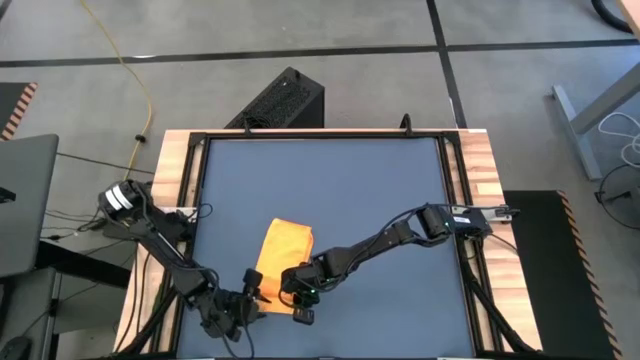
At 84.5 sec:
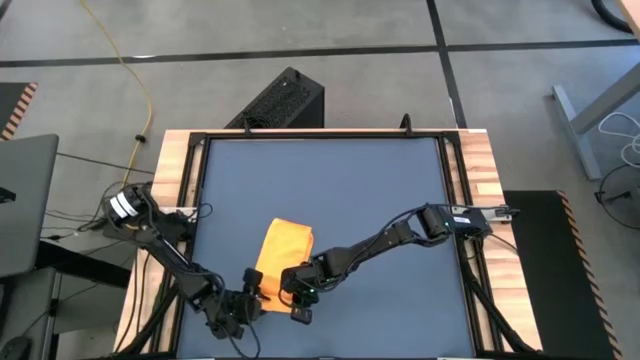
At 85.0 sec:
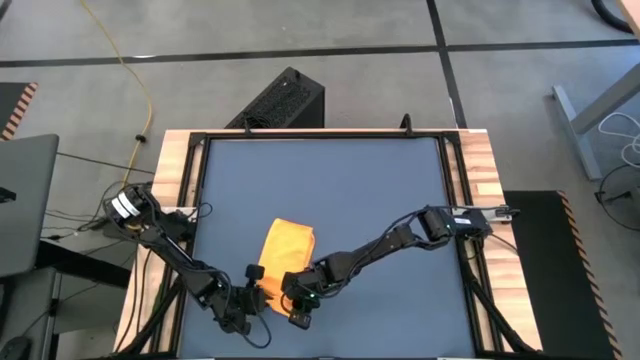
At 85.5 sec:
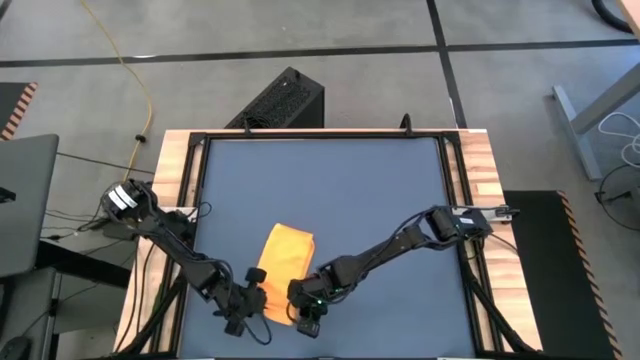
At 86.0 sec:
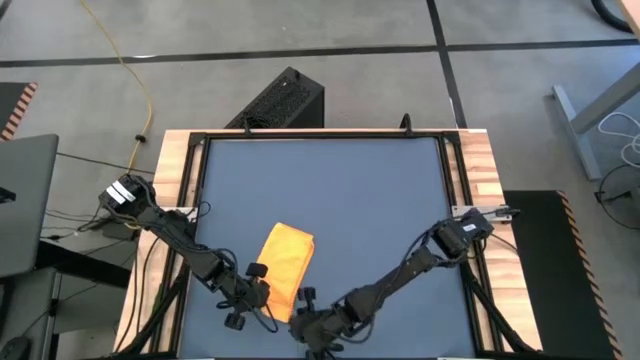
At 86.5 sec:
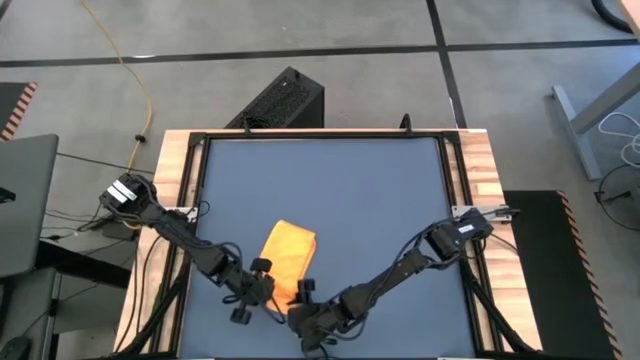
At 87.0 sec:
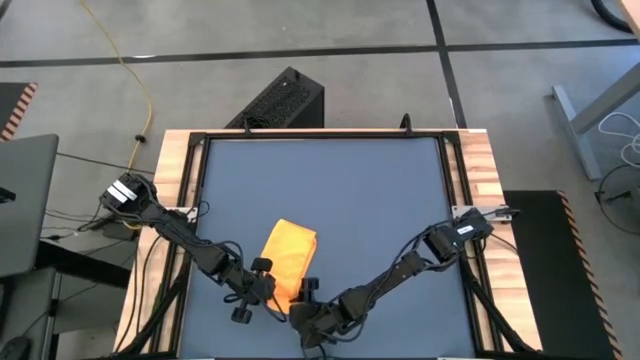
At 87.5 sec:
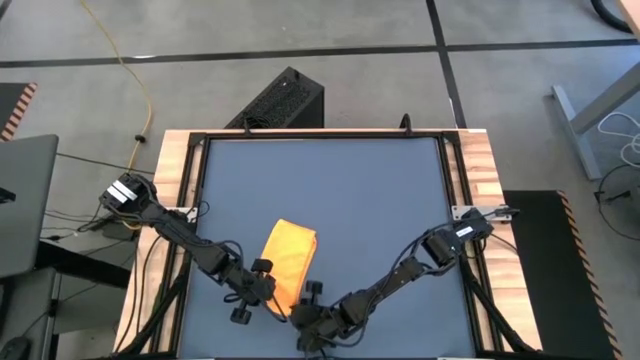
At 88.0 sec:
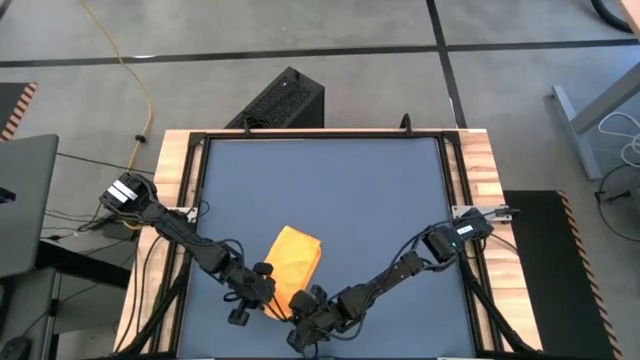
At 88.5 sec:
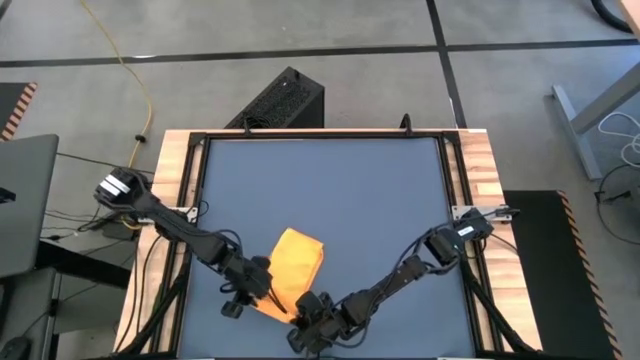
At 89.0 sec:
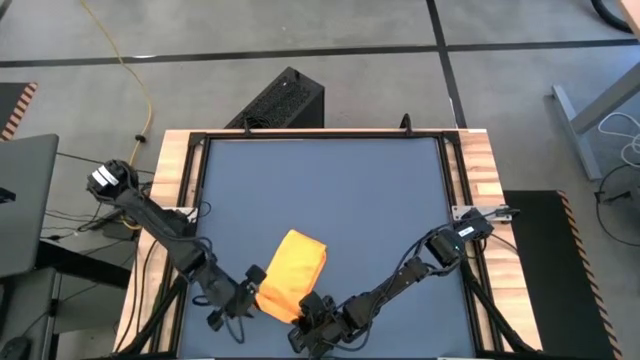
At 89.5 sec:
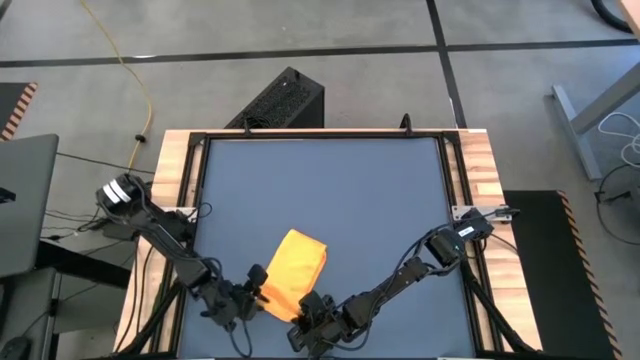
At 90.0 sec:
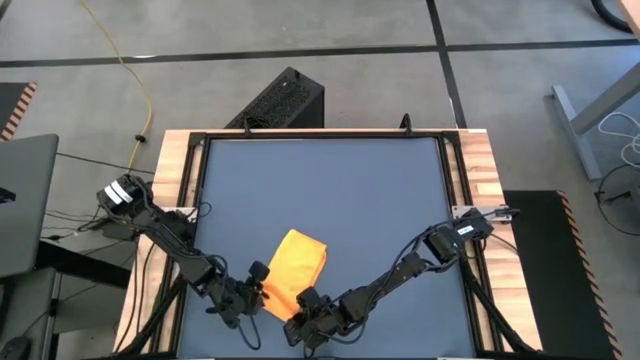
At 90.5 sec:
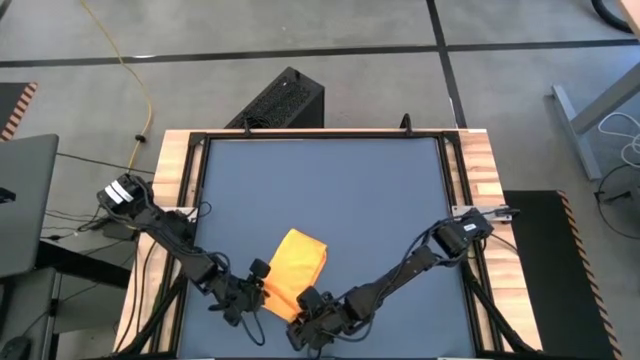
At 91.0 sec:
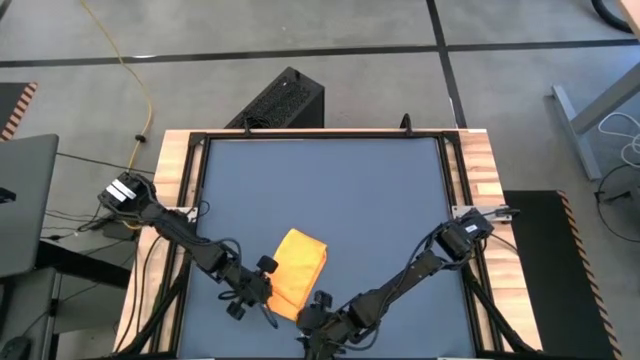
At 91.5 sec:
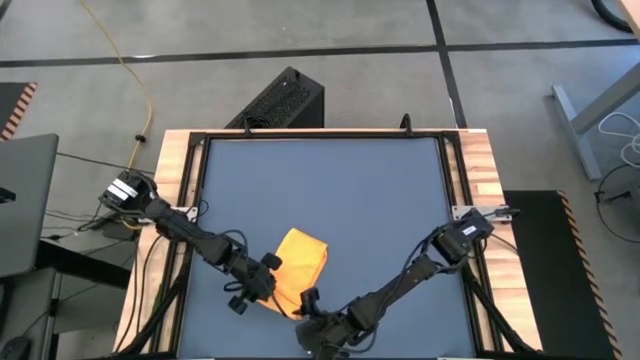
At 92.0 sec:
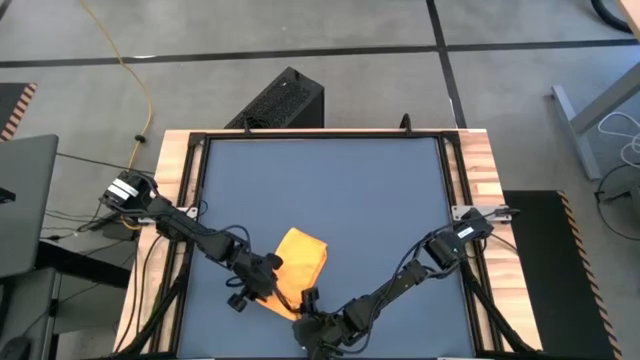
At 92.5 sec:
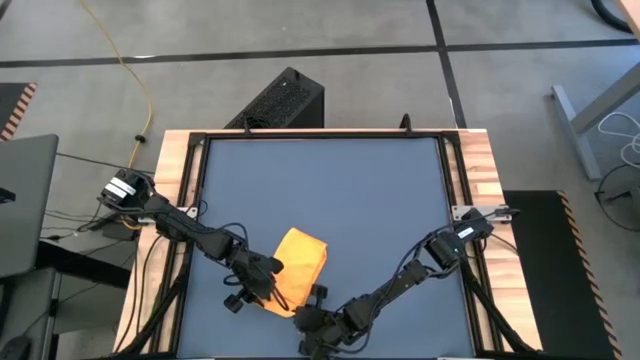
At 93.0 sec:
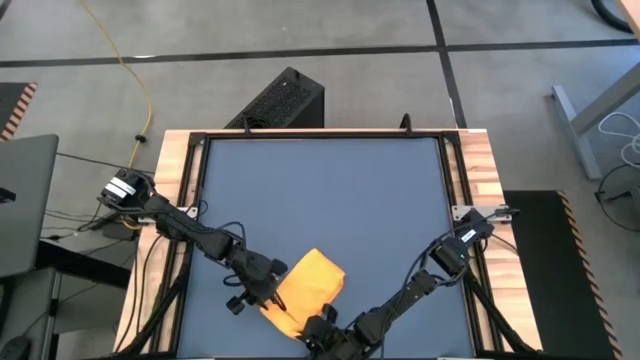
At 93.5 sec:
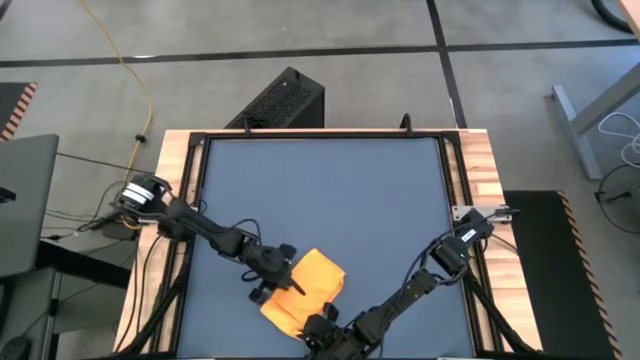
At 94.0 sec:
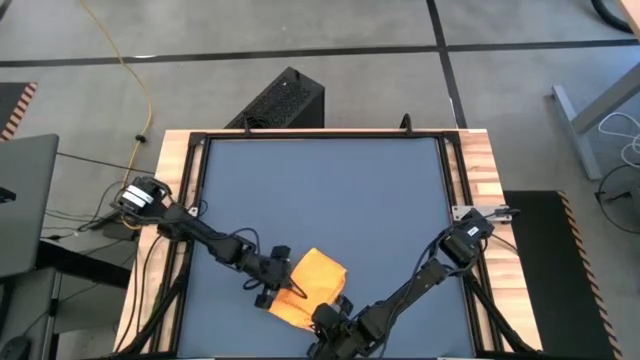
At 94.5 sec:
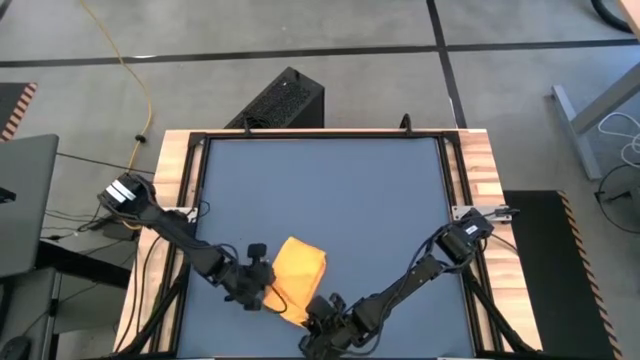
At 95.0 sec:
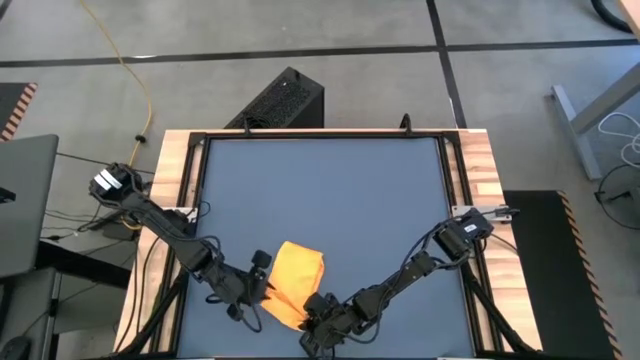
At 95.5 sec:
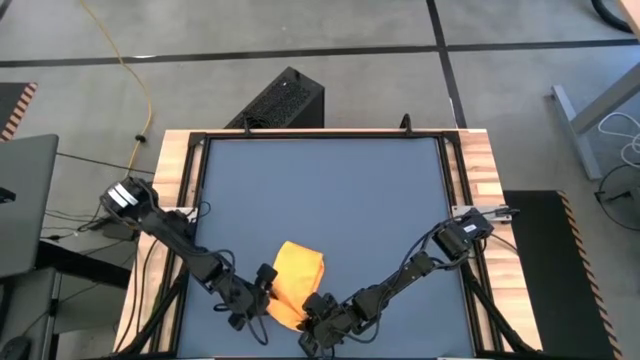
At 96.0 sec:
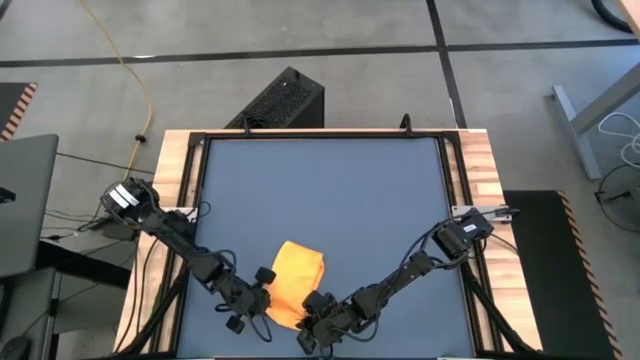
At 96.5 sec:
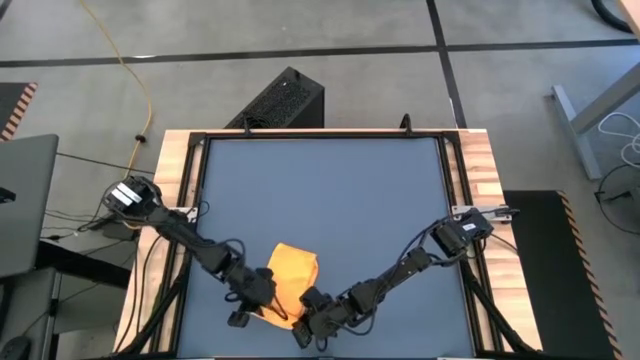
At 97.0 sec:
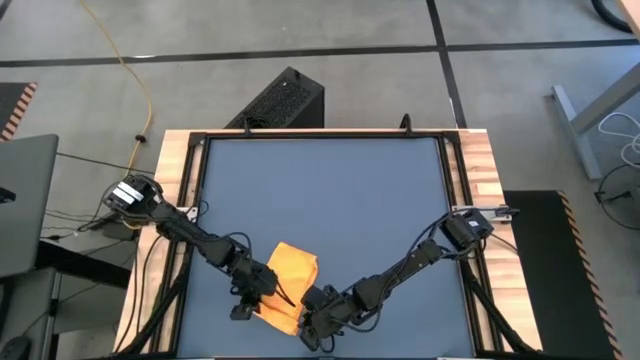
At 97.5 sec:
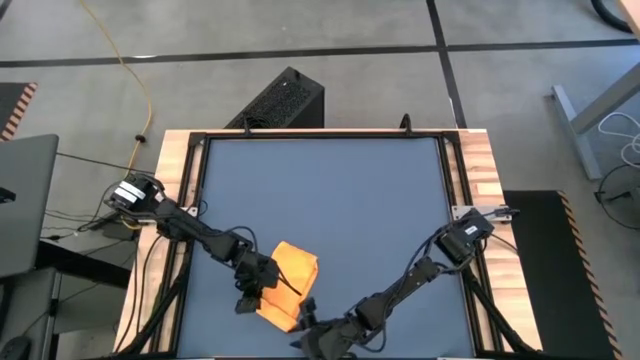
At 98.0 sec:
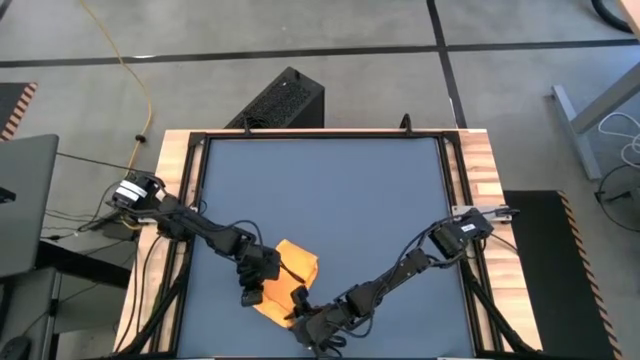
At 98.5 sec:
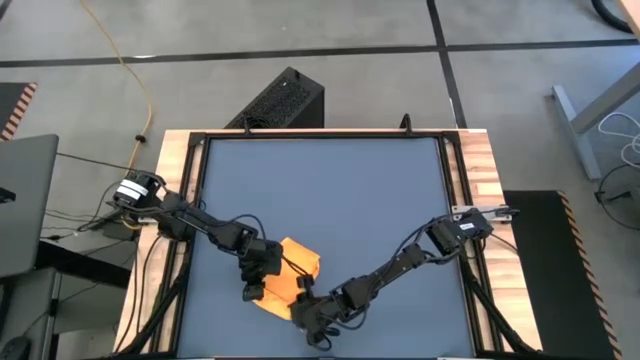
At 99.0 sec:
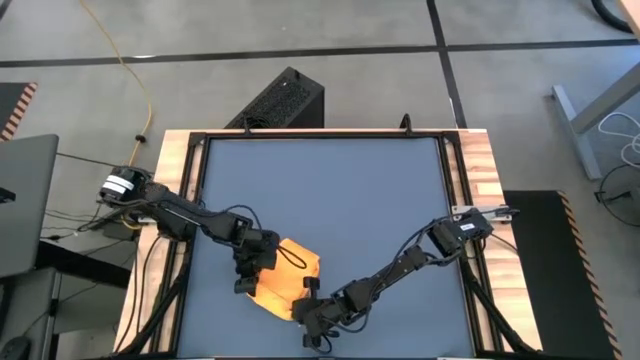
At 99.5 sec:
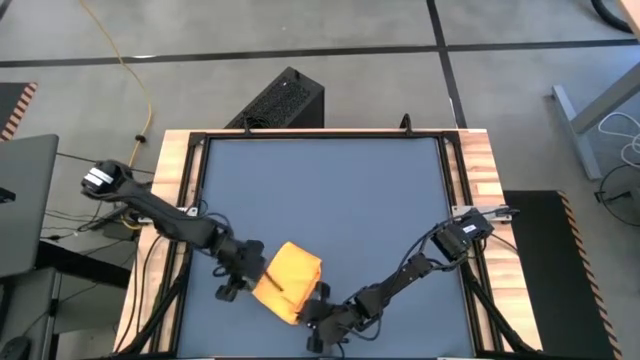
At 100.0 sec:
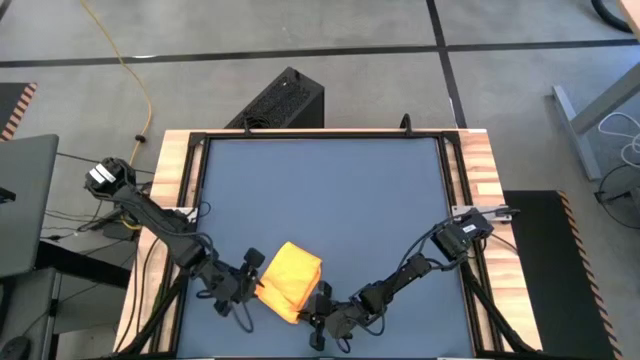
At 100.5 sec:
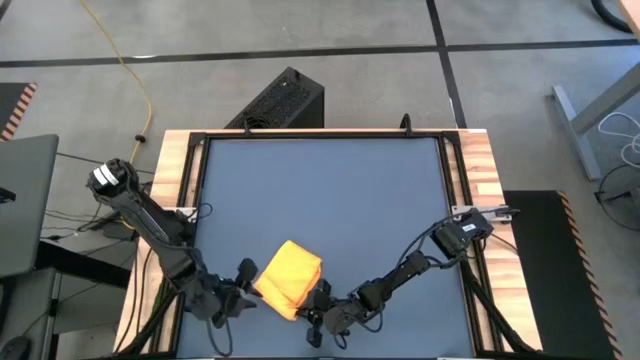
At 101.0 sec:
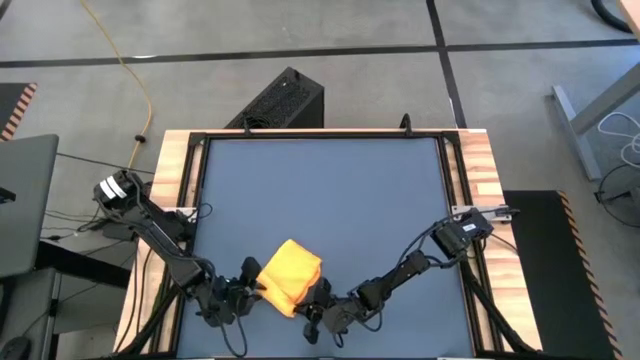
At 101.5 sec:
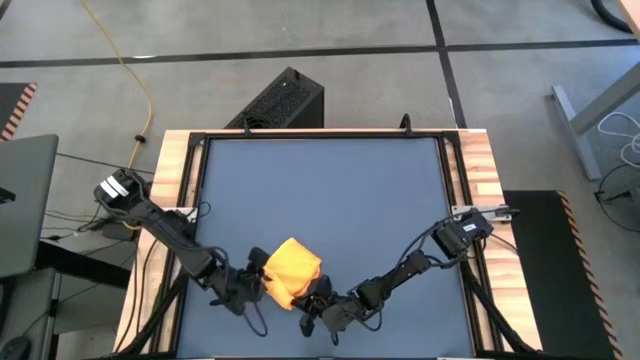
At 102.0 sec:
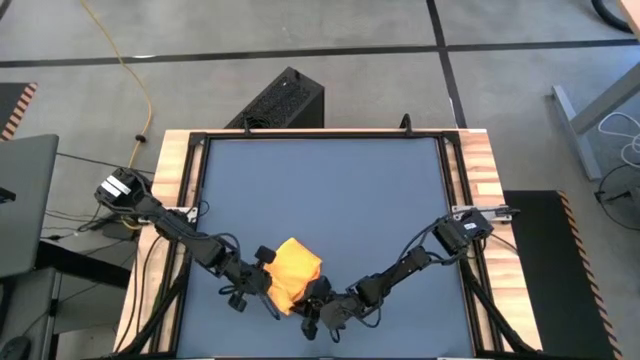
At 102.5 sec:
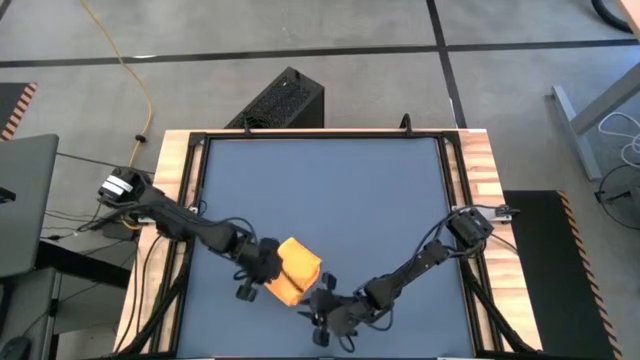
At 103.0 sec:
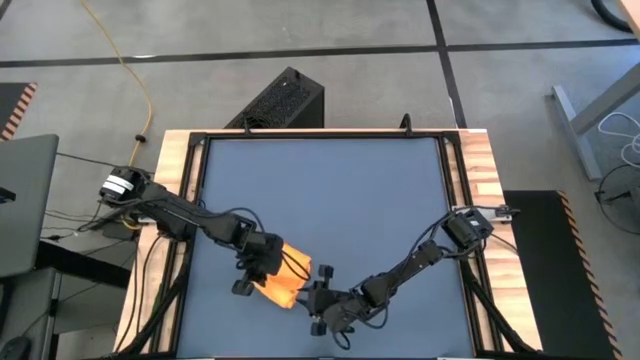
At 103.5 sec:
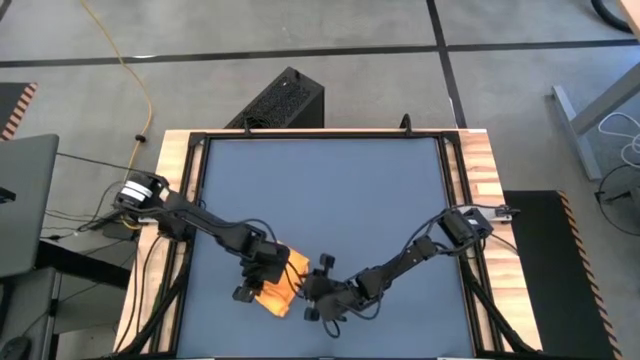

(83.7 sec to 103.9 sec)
Task: Roll towel
Roll the yellow microfiber cloth on the table
